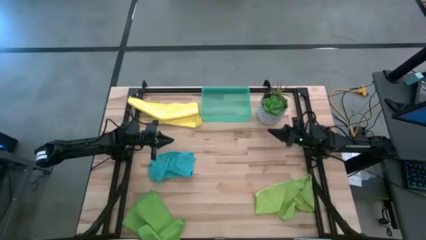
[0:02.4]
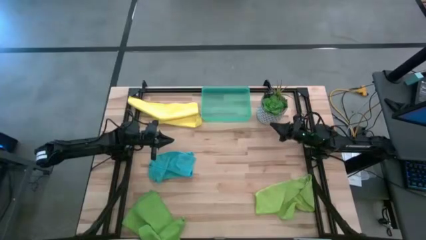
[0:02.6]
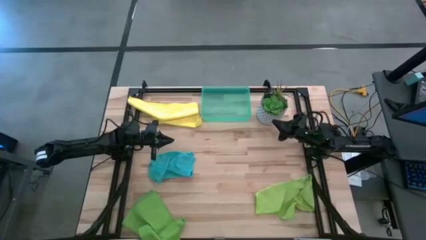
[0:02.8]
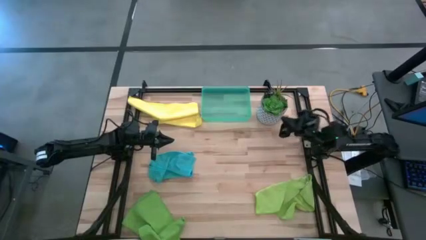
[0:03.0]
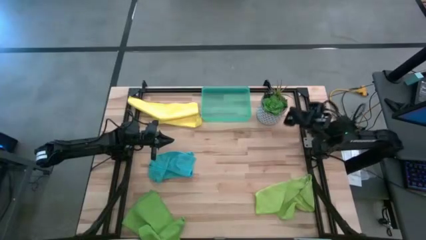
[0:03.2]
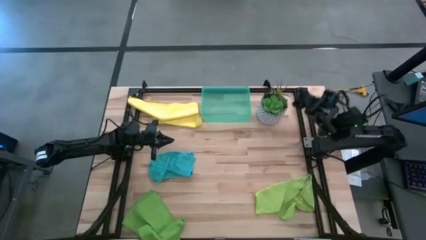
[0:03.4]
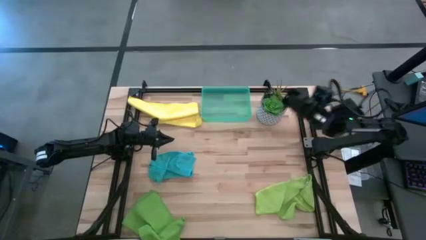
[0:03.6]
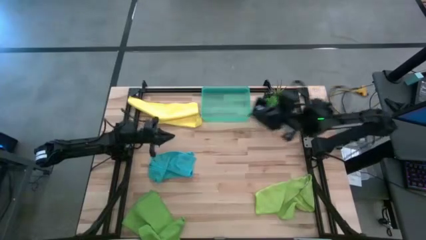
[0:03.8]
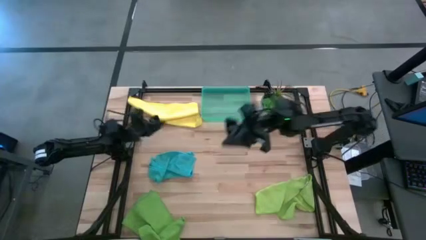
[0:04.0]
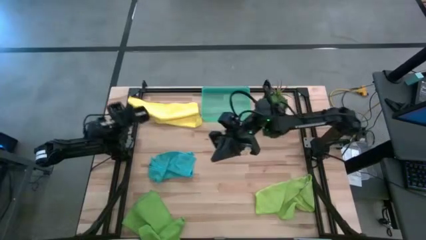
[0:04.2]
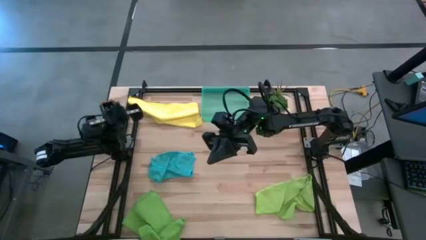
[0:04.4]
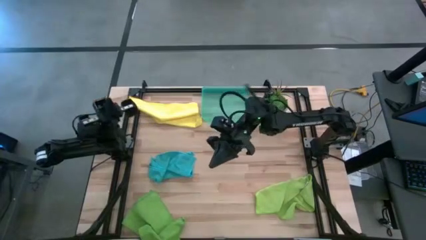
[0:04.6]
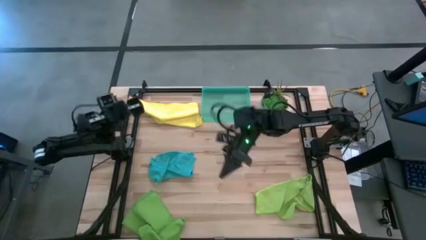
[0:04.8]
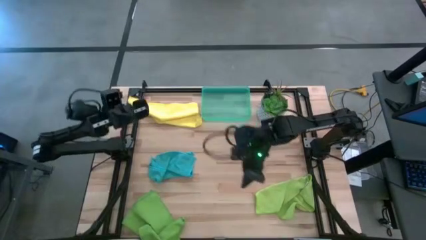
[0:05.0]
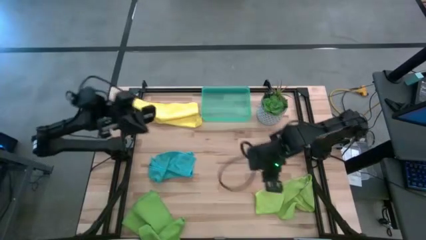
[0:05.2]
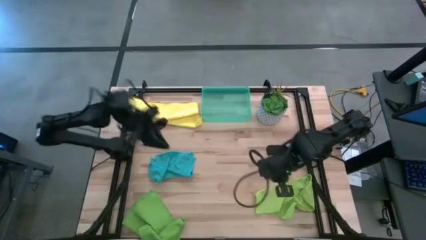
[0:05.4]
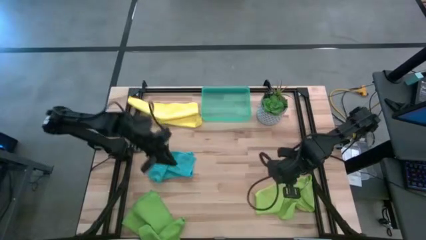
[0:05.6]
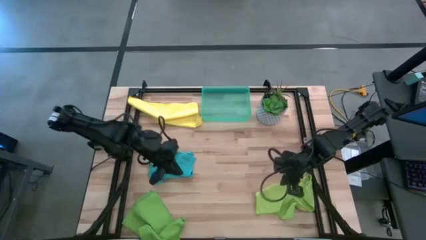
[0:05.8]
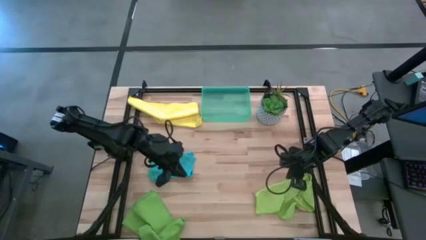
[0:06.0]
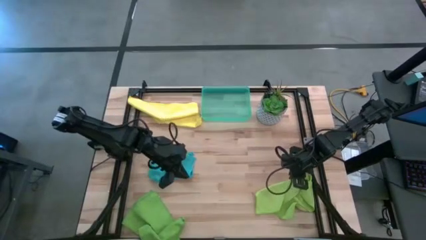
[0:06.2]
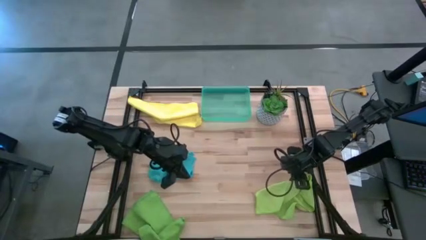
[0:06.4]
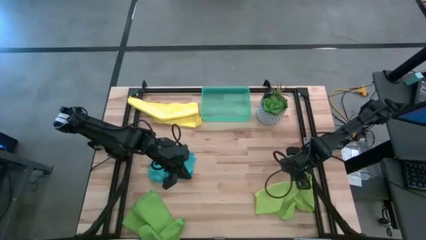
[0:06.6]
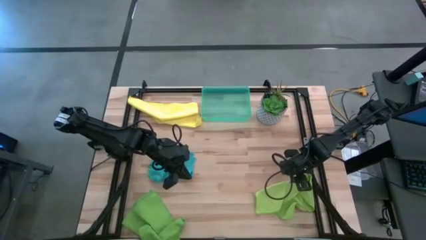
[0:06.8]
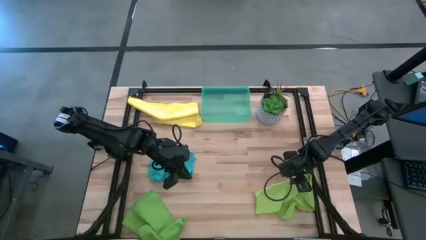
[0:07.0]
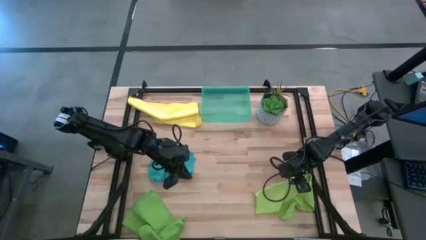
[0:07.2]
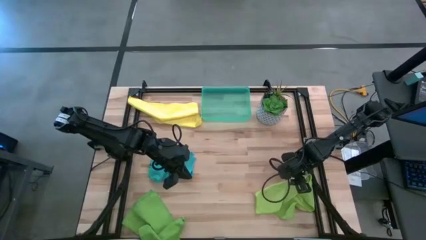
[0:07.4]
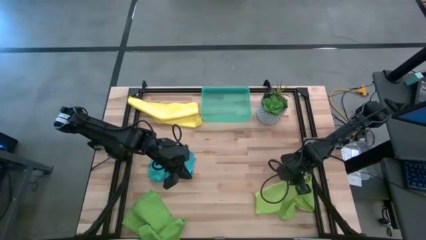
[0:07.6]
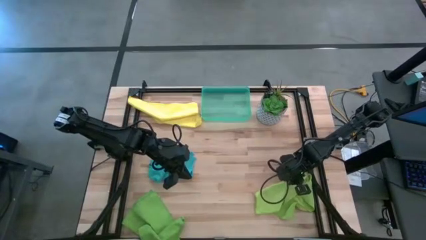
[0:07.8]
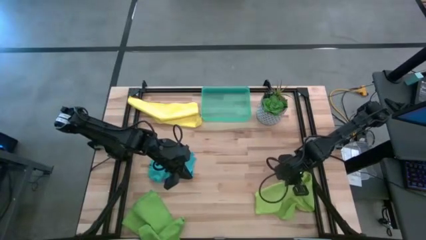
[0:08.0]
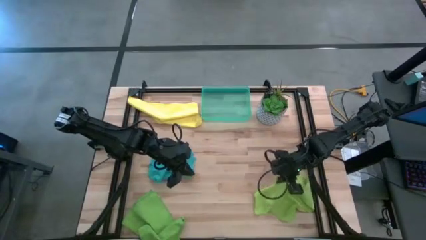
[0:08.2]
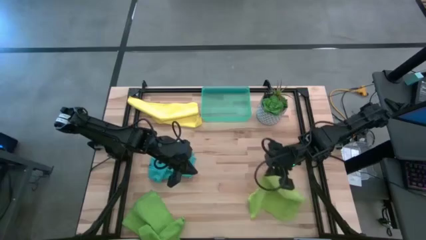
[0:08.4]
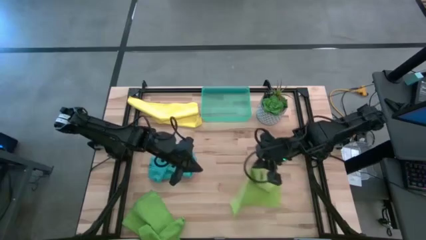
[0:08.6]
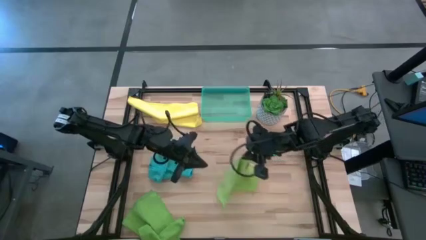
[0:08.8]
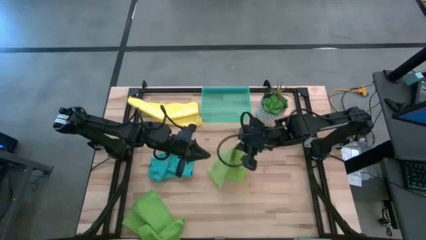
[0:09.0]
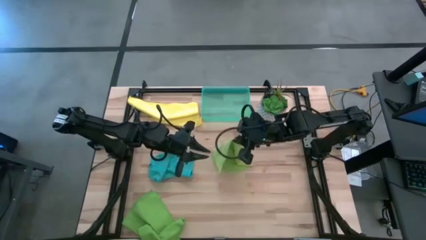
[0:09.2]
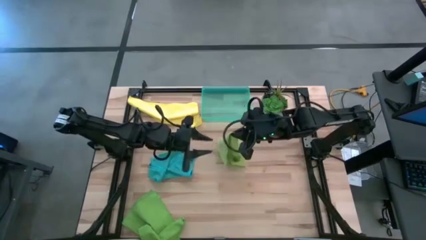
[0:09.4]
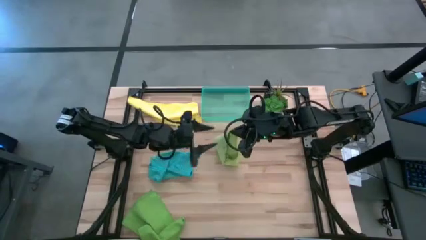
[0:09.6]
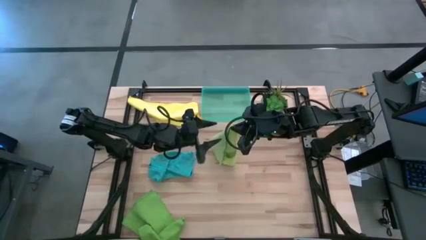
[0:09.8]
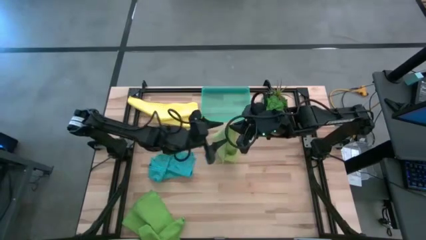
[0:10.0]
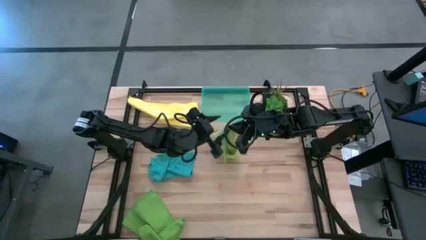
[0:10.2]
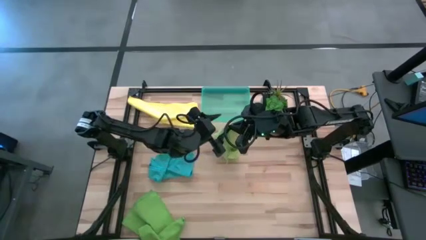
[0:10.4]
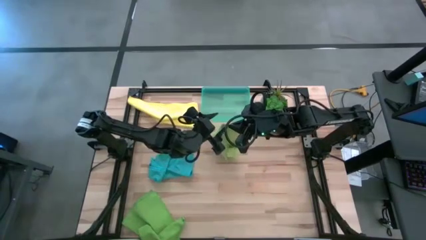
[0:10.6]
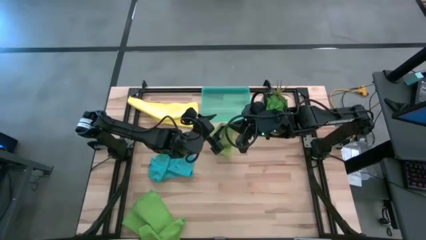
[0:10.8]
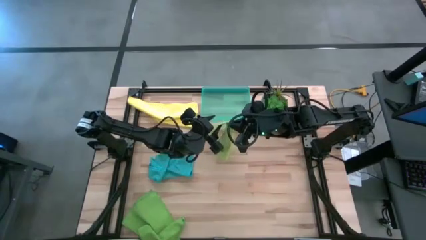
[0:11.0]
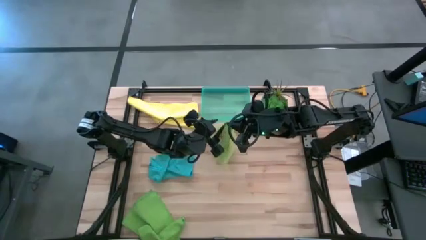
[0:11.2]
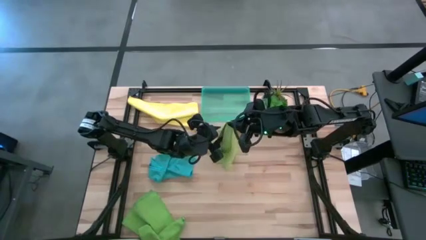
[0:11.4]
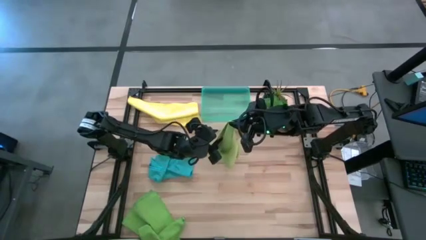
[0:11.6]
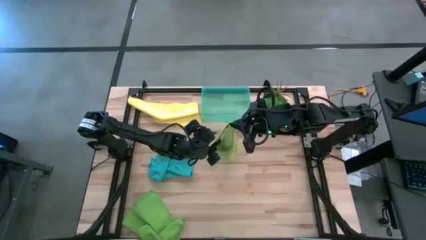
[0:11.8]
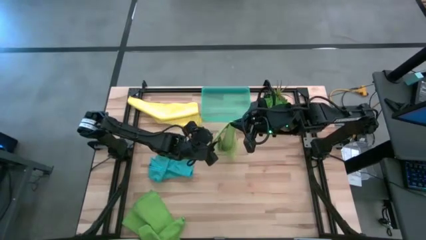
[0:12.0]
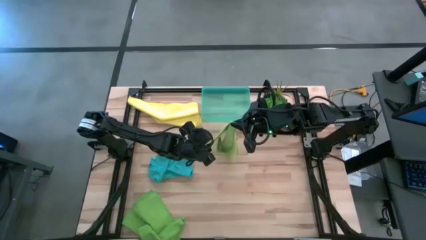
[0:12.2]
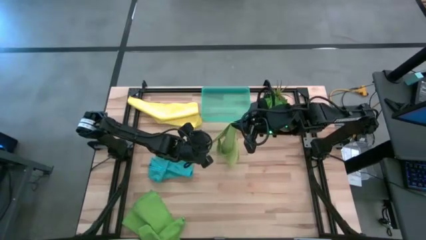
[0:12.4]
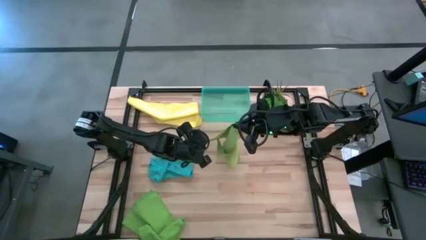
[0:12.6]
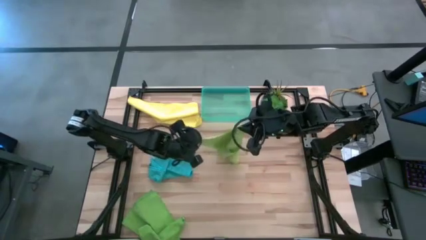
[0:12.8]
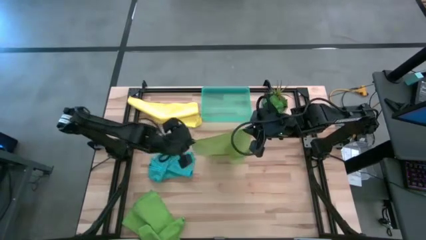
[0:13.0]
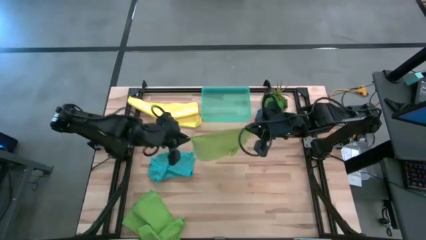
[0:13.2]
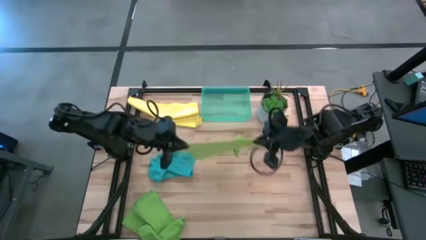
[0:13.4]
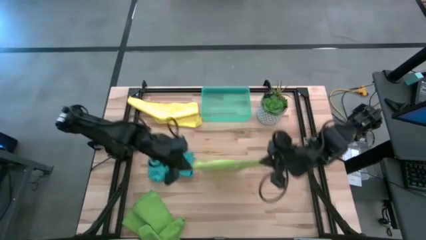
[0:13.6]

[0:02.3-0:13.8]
Task: Fold microfiber towels
Fold the light green microfiber cloth
